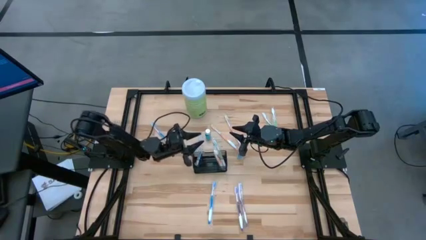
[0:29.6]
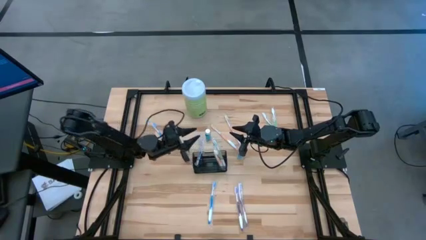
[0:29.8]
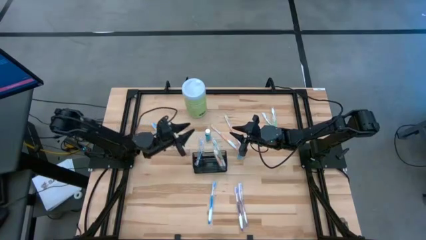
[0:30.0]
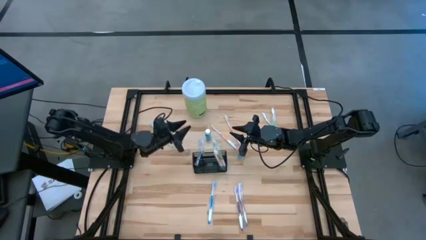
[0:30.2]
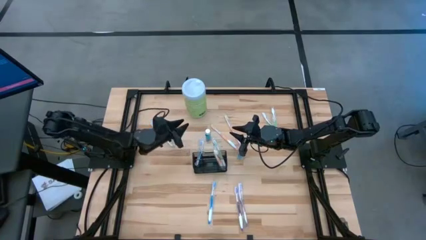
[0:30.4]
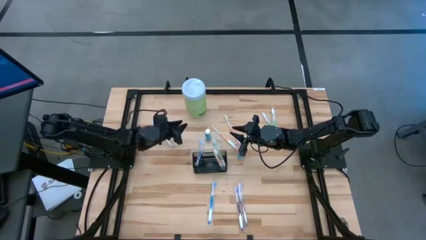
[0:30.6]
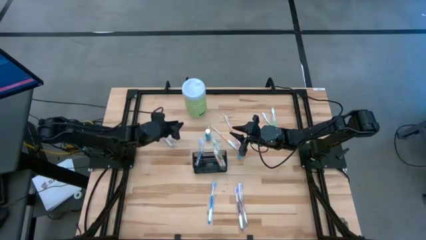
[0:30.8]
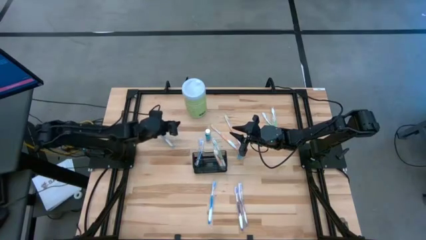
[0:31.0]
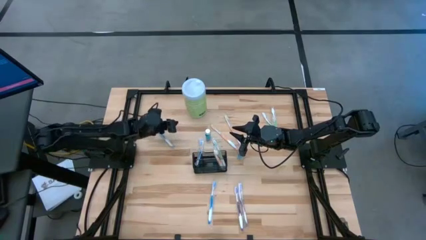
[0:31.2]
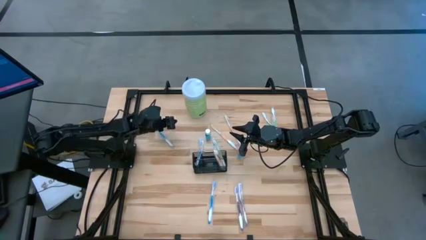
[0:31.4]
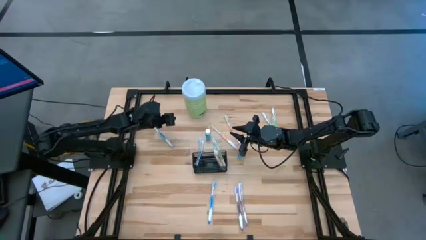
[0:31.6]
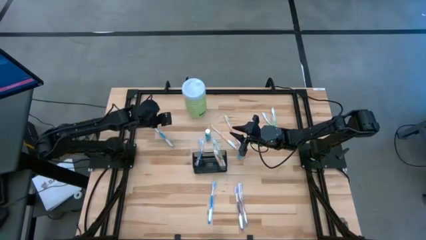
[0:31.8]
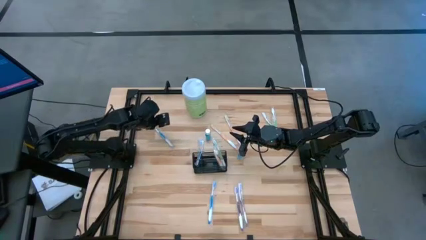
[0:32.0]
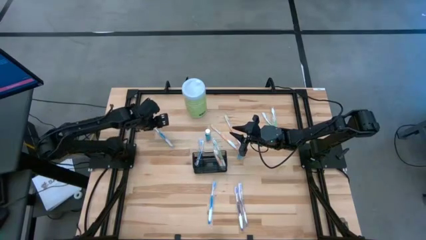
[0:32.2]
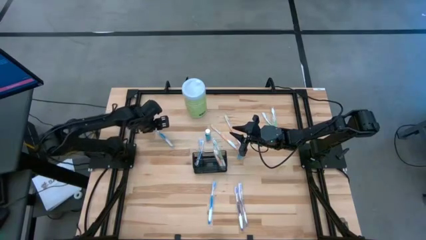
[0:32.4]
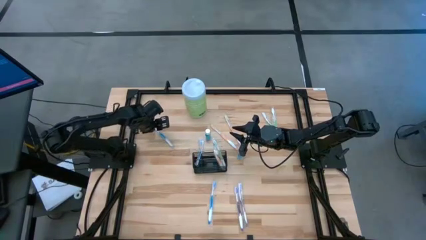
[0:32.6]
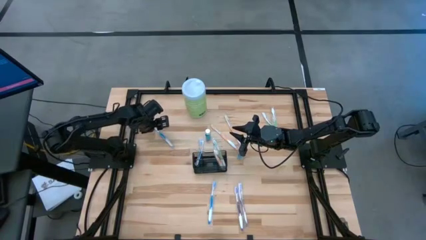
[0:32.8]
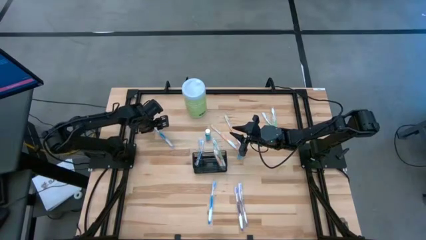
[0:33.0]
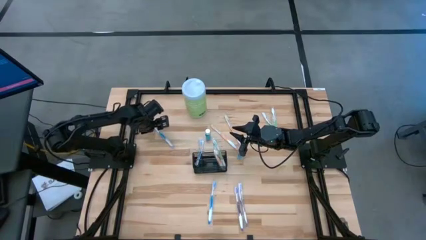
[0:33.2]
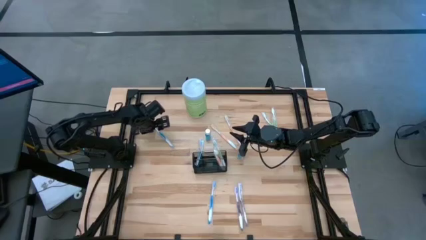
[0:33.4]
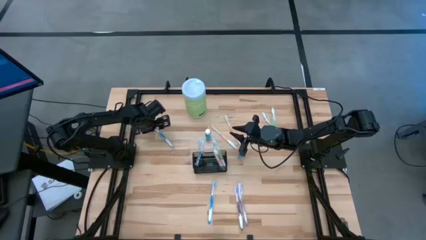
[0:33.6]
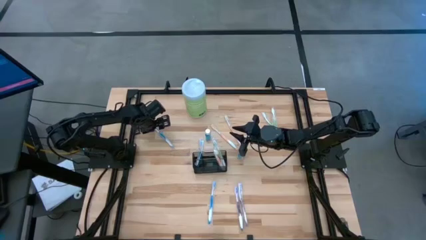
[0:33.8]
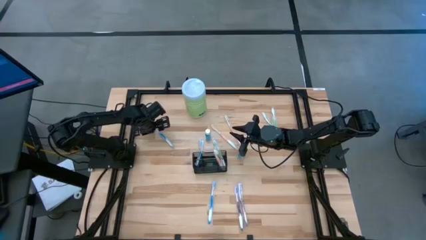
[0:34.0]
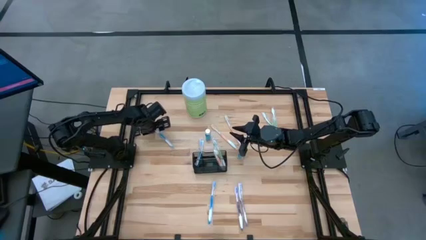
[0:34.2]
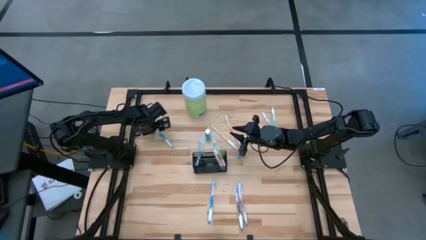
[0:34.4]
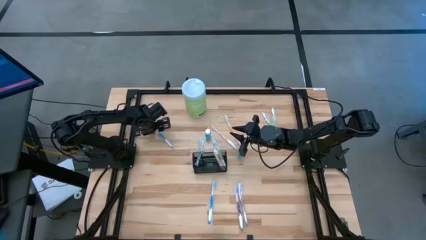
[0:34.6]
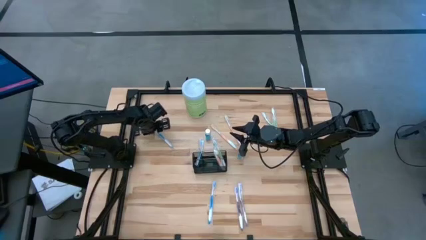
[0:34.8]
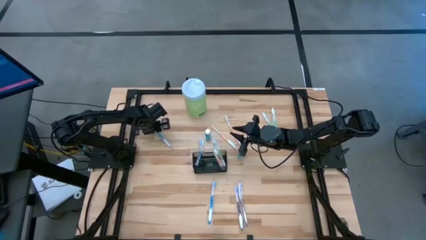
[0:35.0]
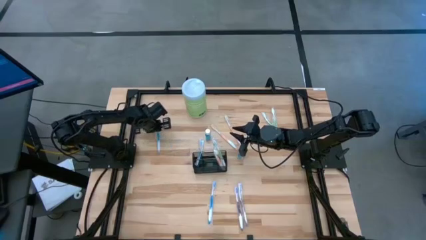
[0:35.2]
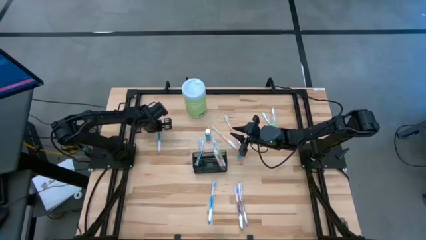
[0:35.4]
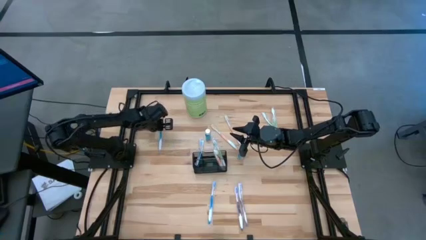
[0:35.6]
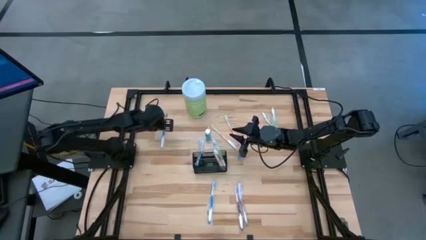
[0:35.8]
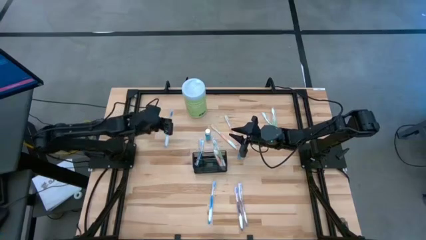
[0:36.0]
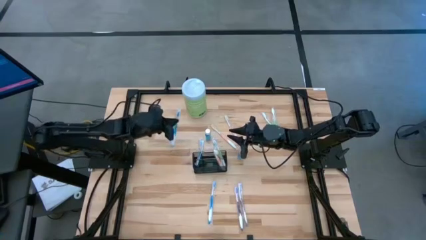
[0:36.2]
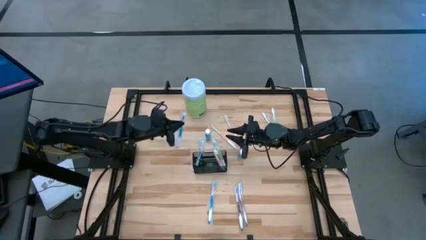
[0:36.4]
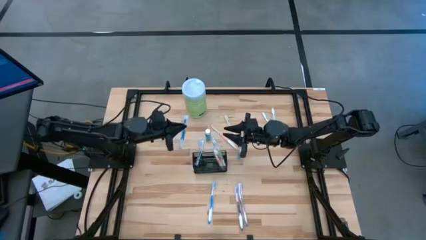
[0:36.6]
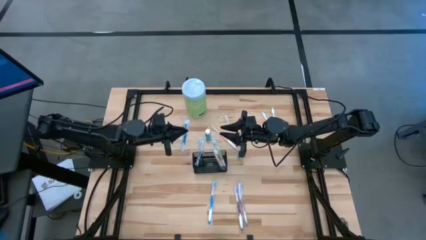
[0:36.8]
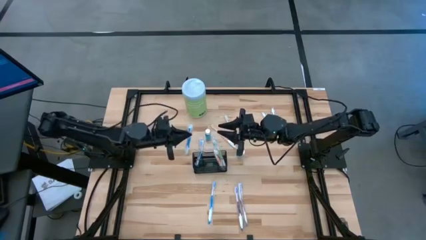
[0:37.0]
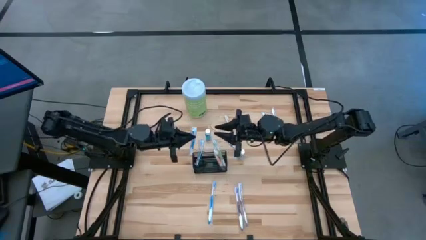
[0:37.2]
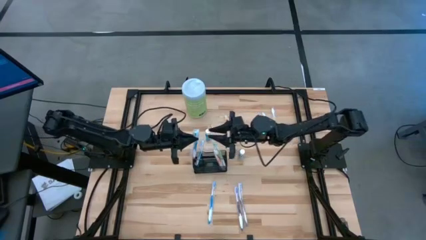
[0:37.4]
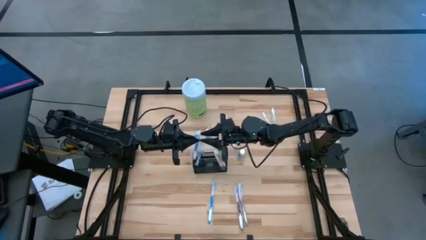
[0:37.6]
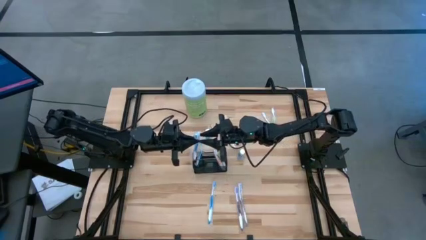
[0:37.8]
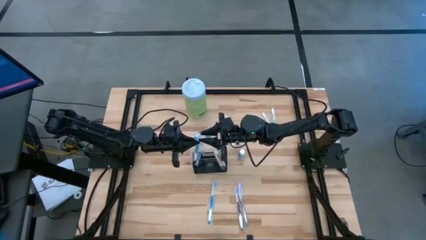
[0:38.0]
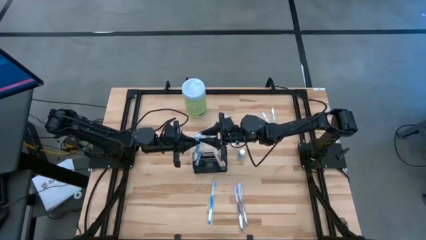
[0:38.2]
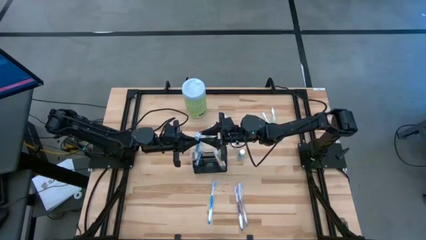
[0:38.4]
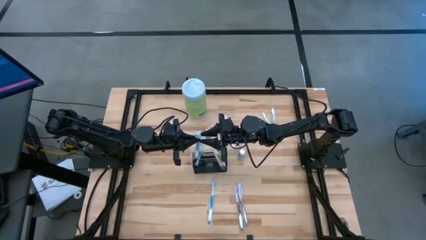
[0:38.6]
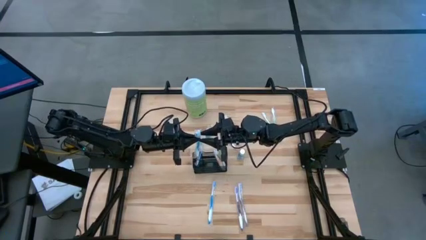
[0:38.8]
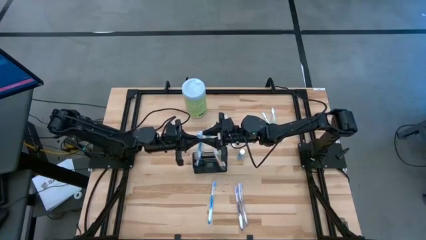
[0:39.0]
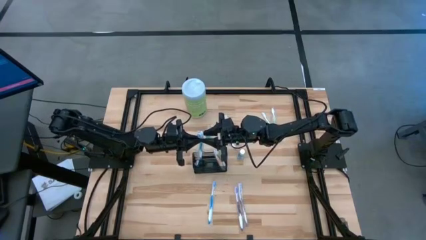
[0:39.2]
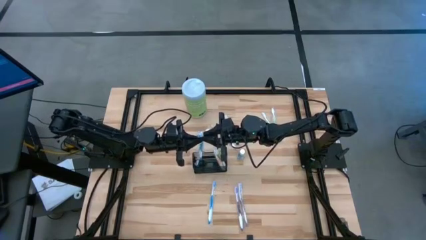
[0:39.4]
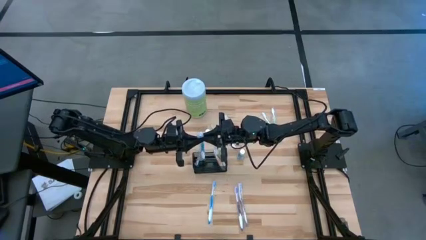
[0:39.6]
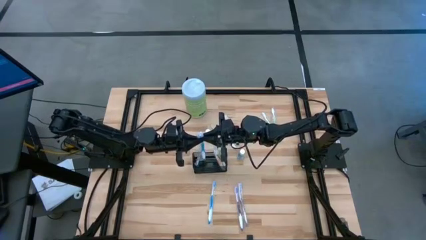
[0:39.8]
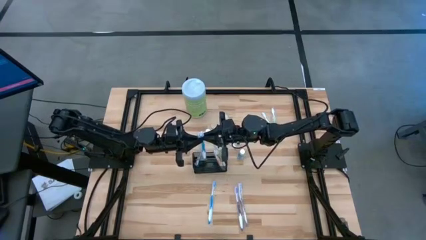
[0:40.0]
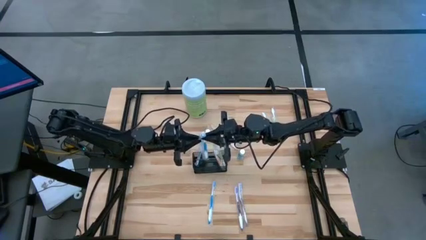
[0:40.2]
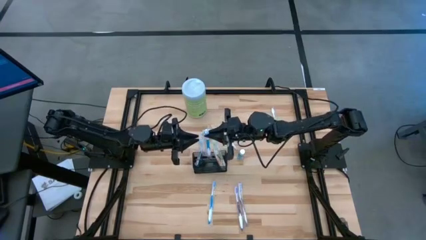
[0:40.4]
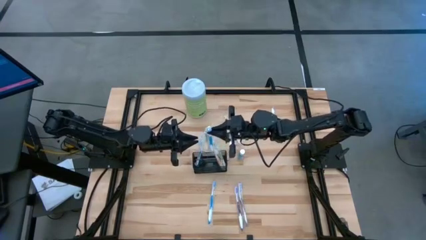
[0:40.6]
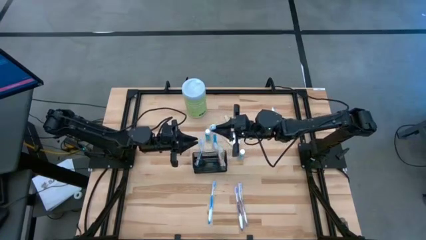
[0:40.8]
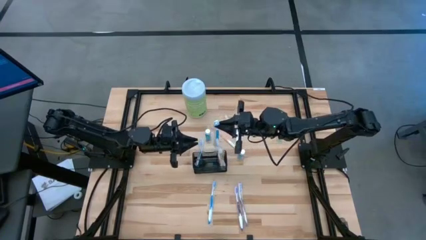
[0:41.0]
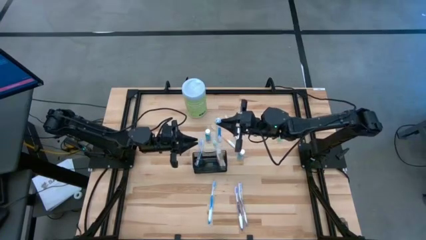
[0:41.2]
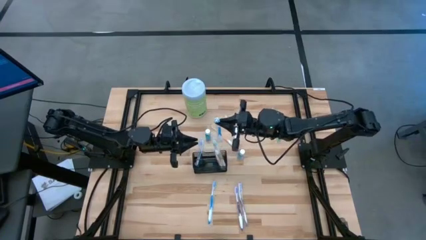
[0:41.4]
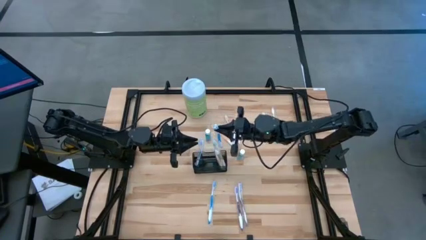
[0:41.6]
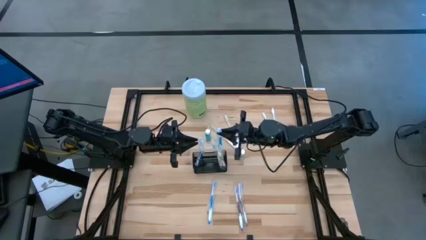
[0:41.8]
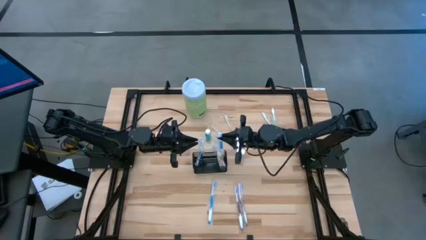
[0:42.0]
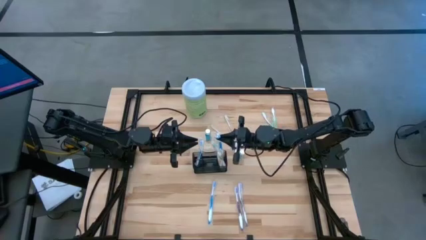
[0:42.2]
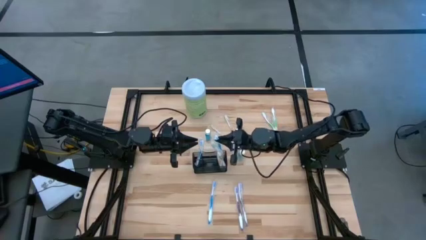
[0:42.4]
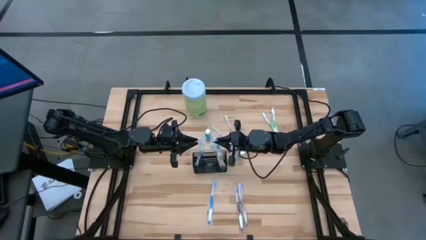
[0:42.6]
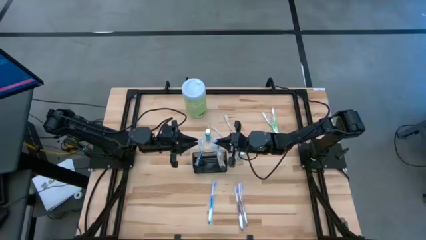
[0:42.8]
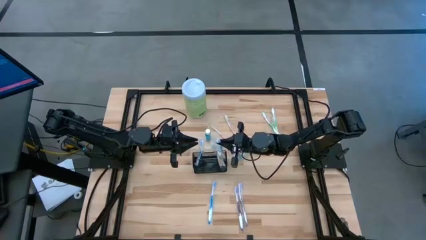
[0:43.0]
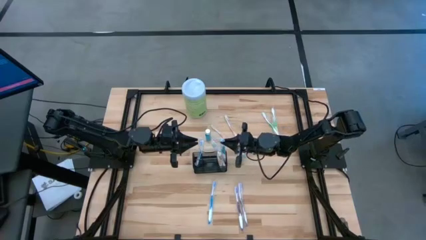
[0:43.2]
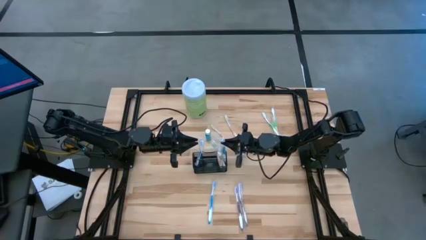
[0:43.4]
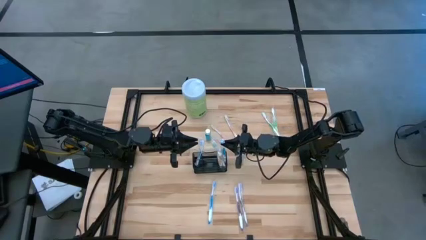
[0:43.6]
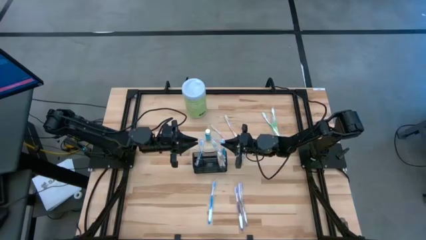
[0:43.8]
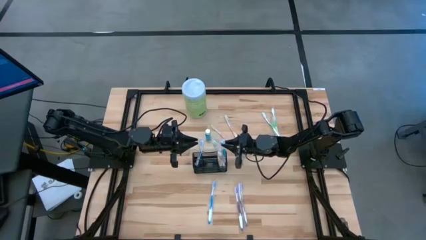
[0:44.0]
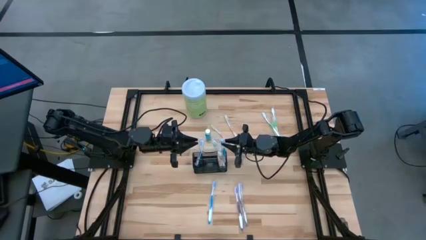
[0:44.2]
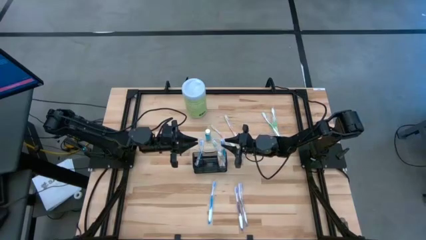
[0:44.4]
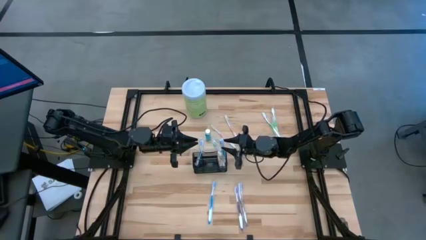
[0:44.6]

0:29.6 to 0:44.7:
Task: Pick & Place toothbrushing station
Put the top blue toothbrush into the wire organizer
